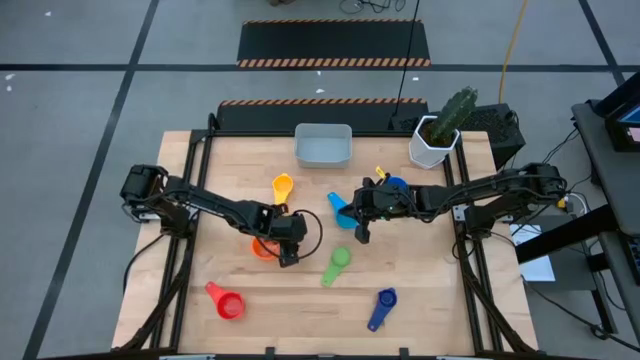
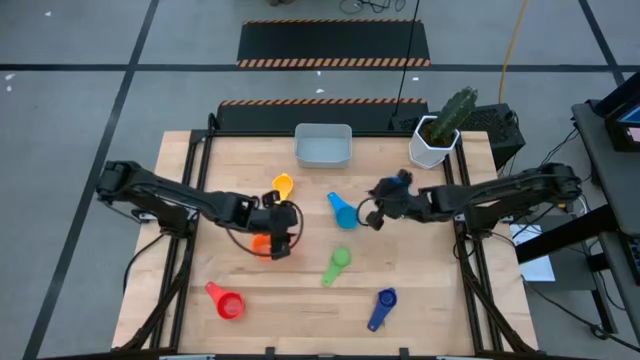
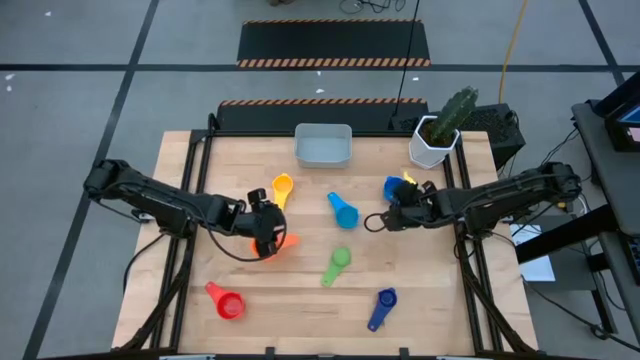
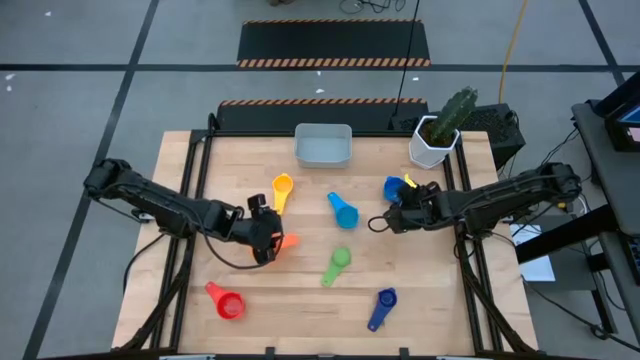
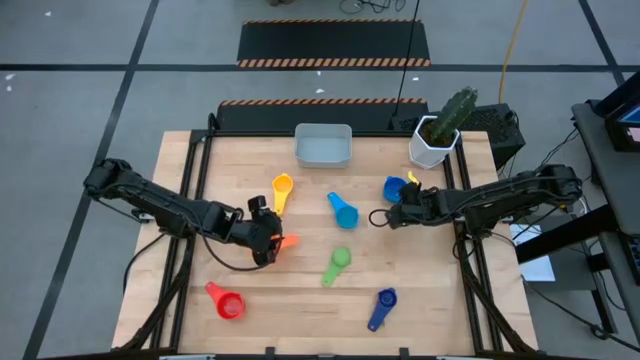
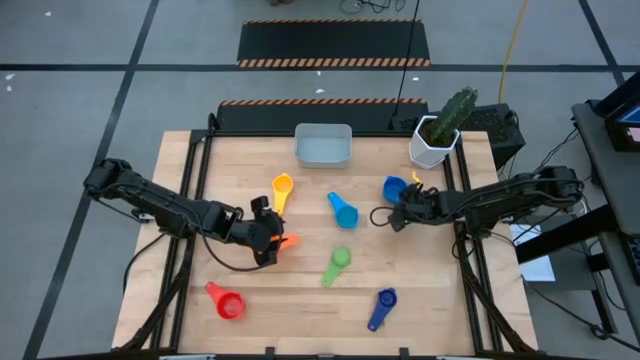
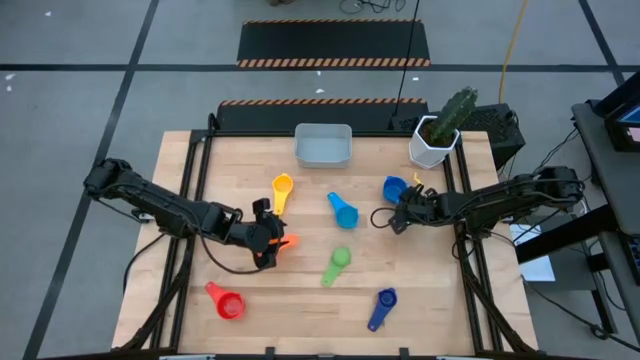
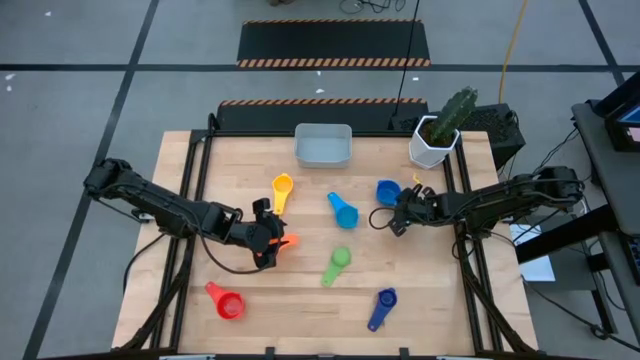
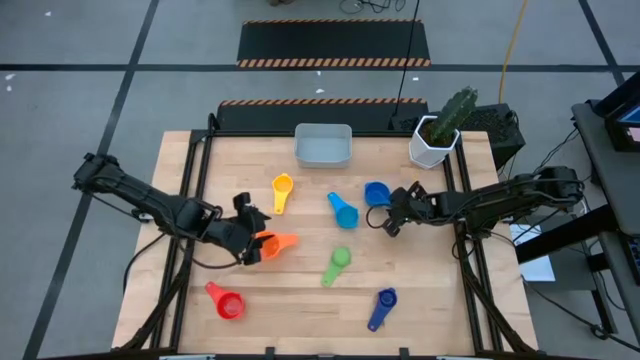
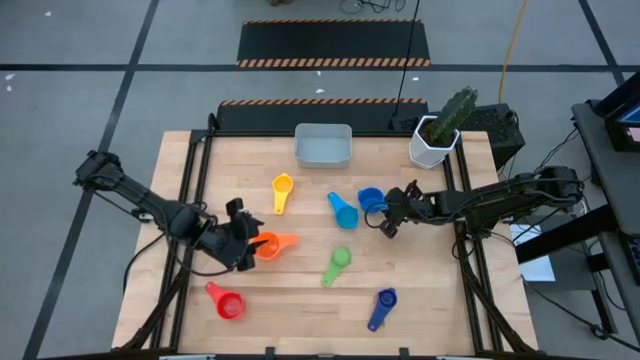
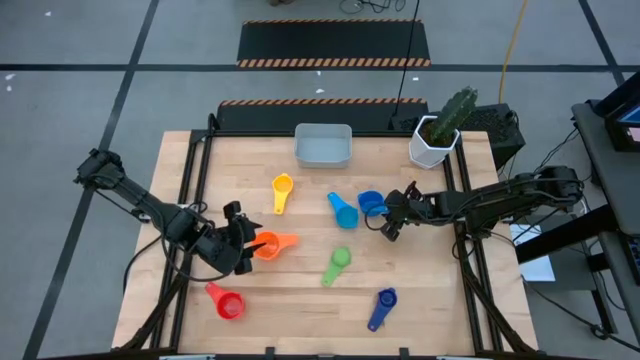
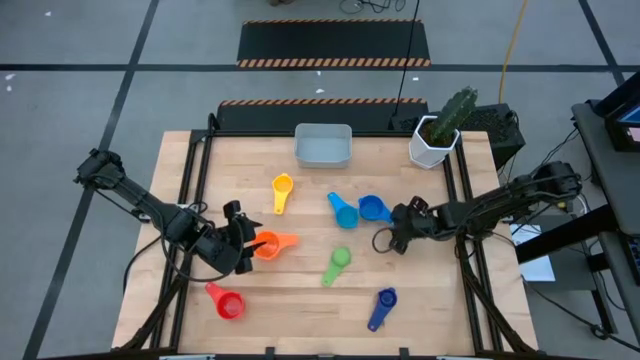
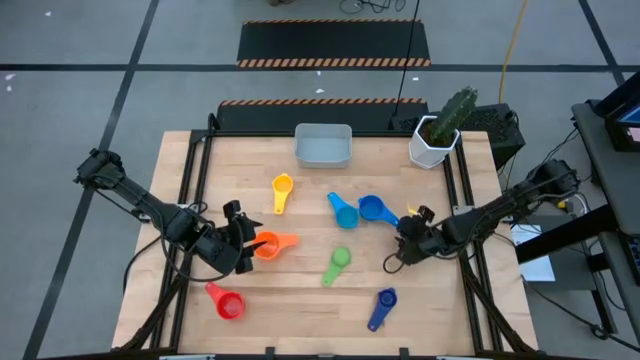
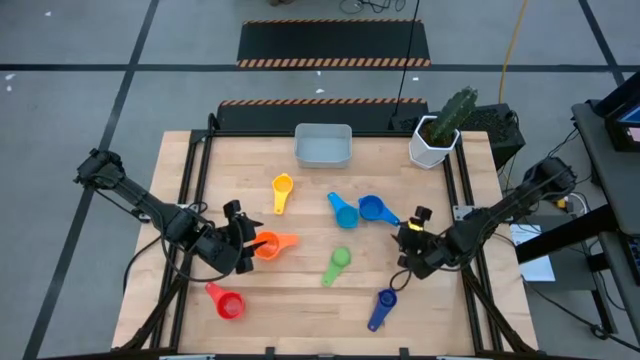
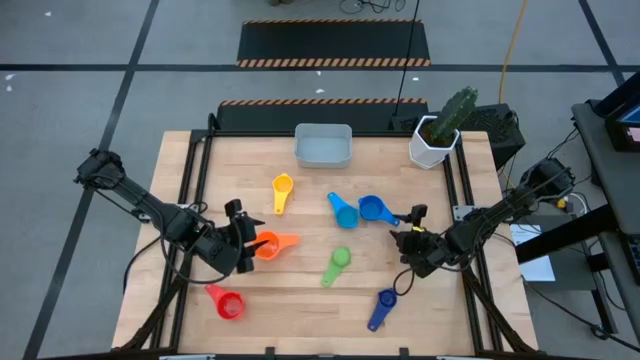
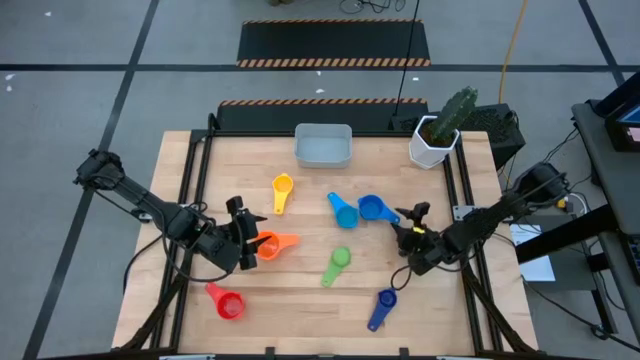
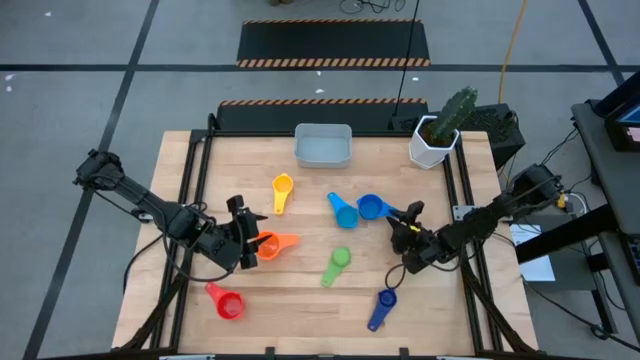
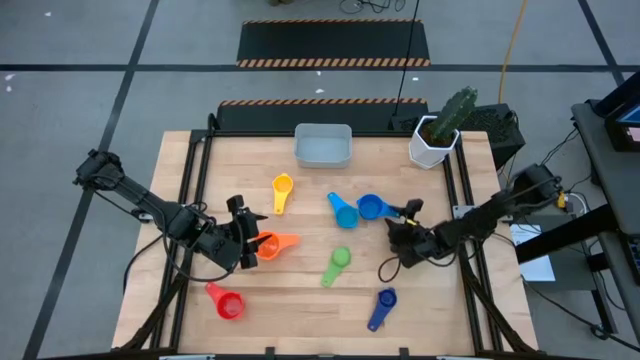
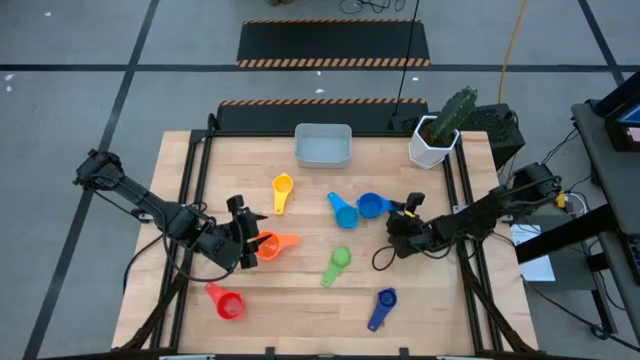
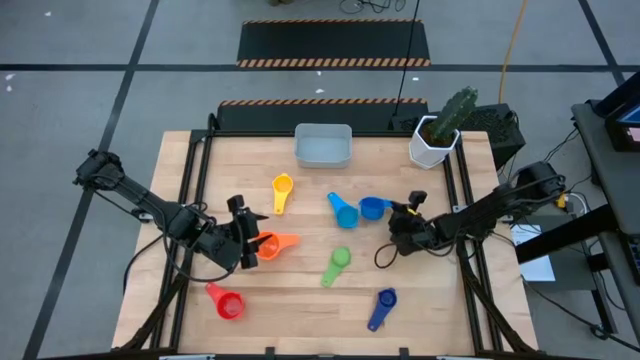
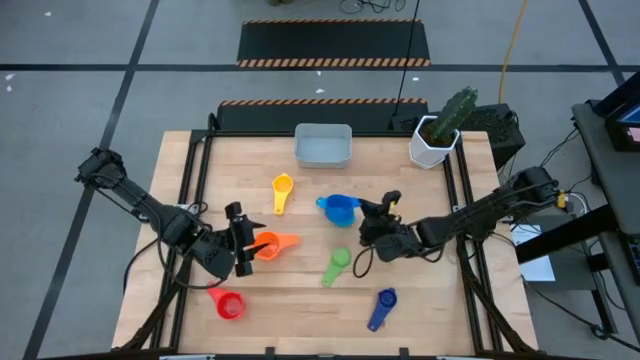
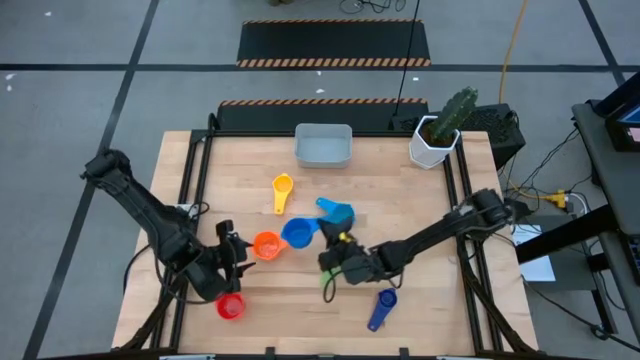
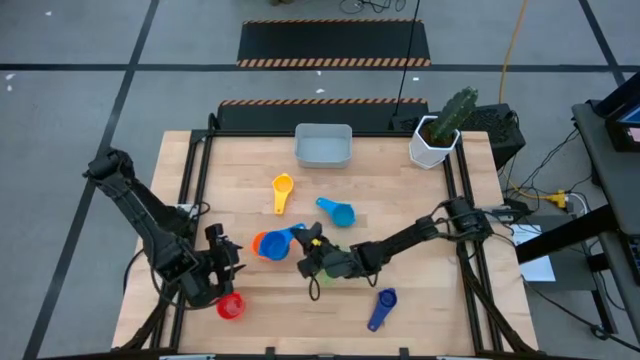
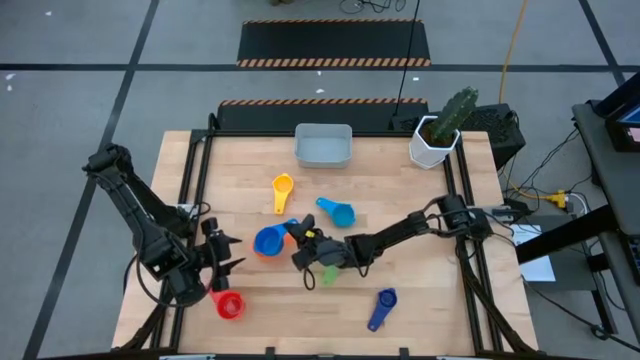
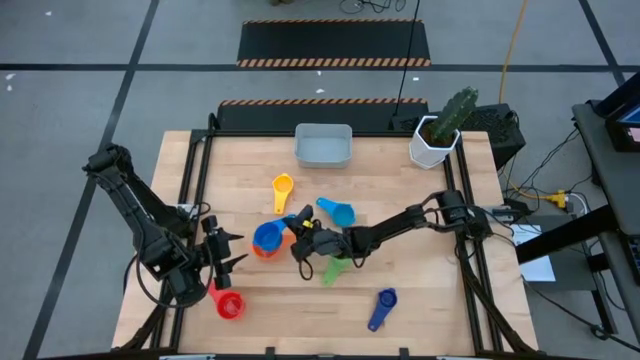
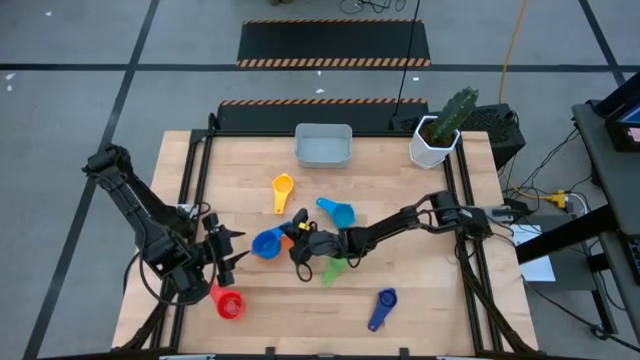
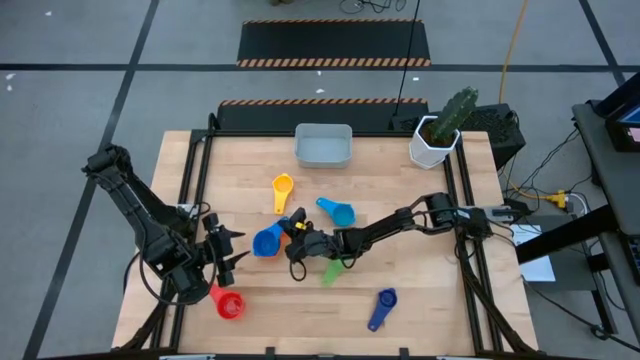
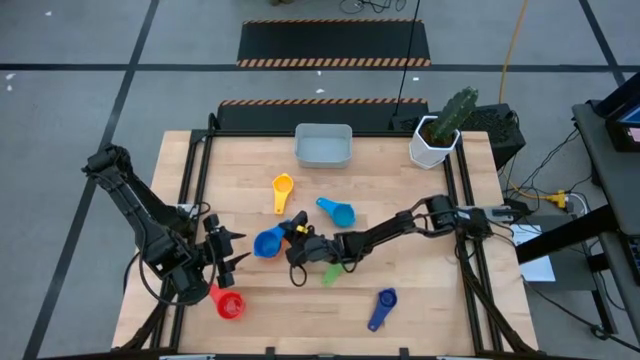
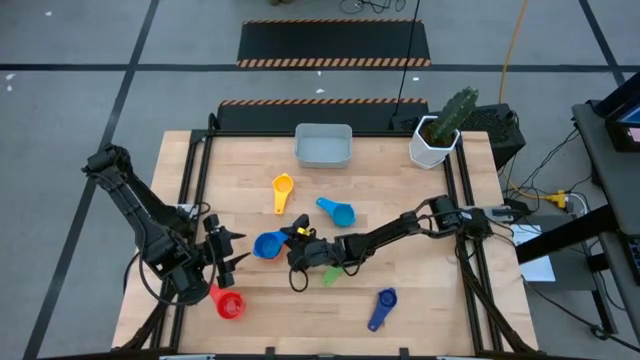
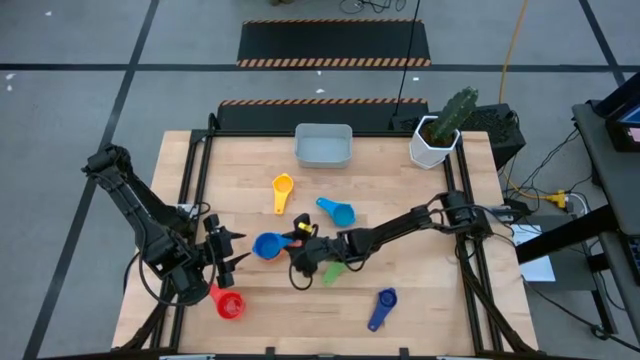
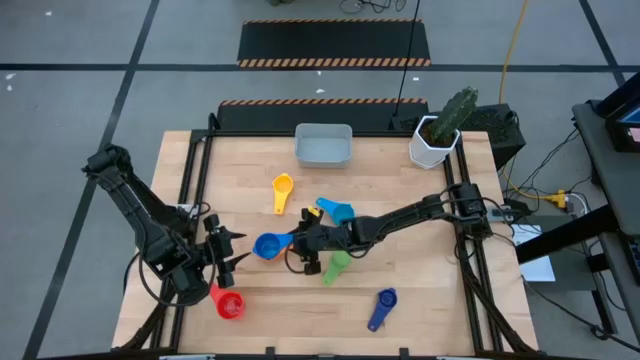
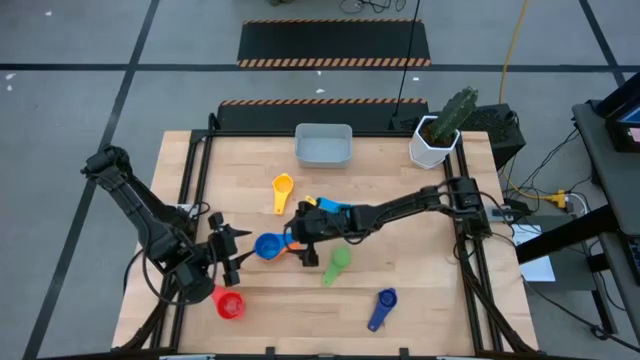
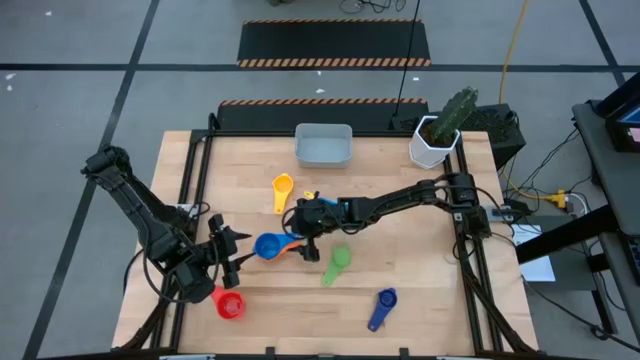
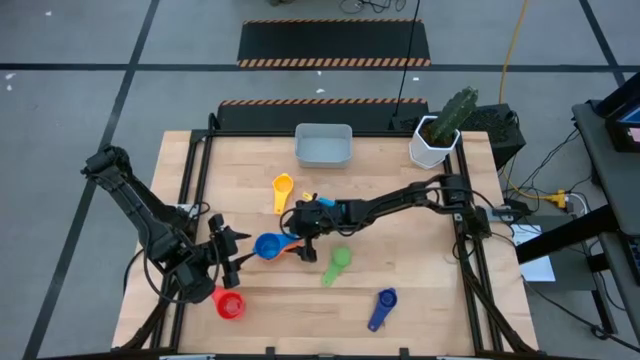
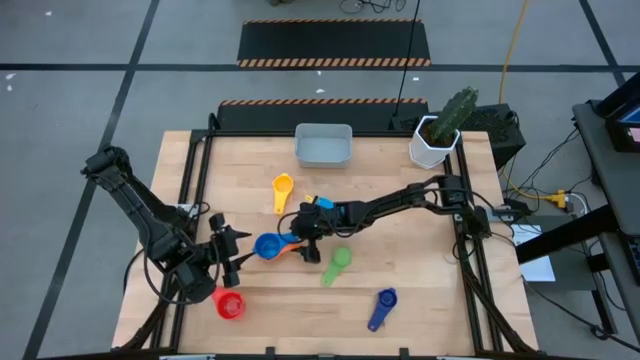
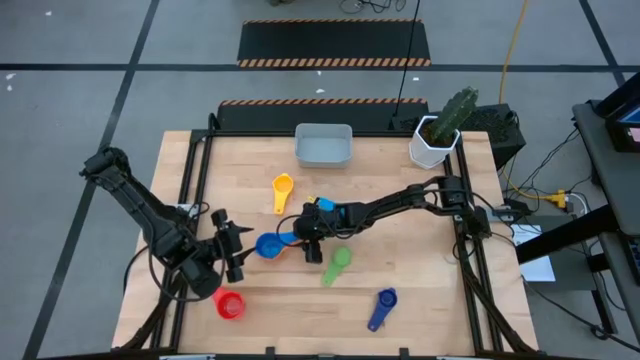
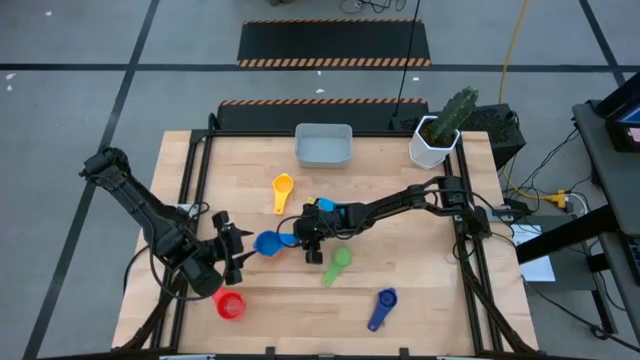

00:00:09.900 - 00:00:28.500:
Task: Nest measuring cups in basket
Stack the blue measuring cup into the orange measuring cup
